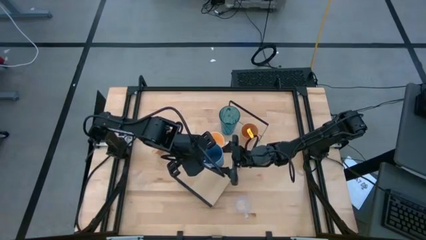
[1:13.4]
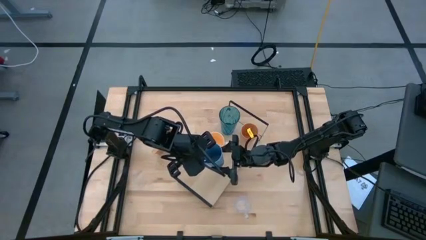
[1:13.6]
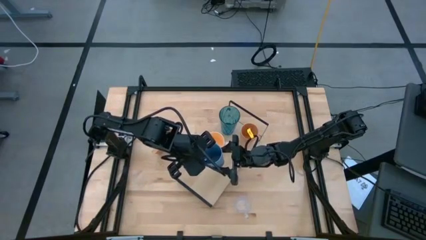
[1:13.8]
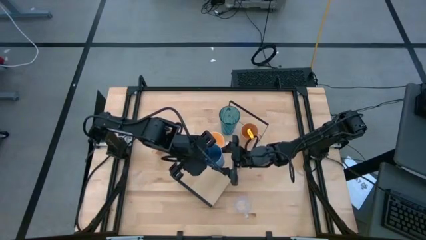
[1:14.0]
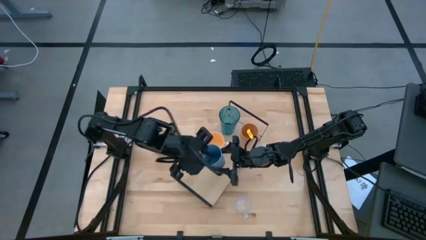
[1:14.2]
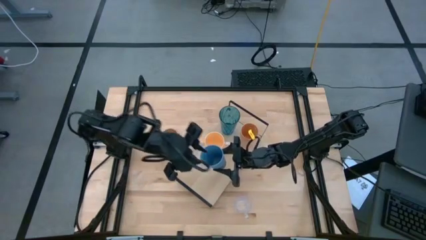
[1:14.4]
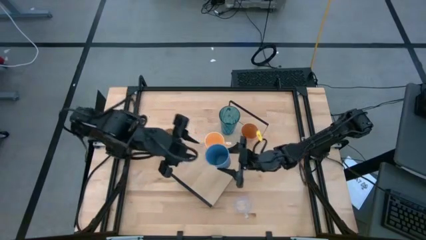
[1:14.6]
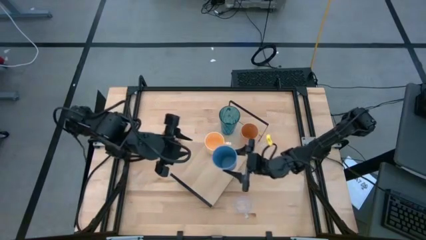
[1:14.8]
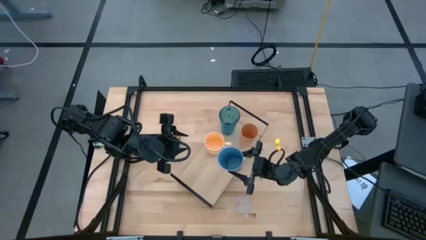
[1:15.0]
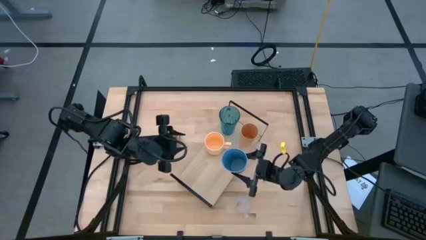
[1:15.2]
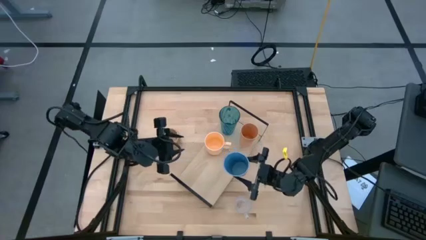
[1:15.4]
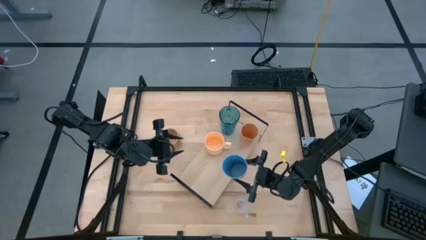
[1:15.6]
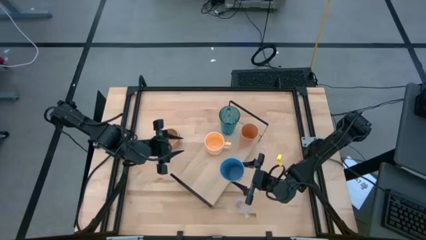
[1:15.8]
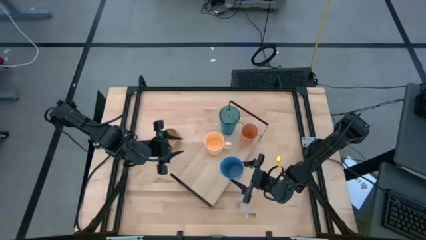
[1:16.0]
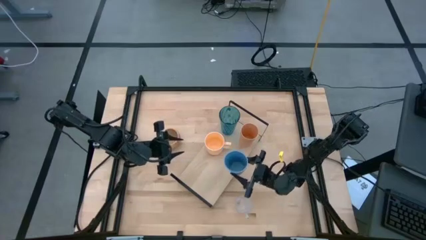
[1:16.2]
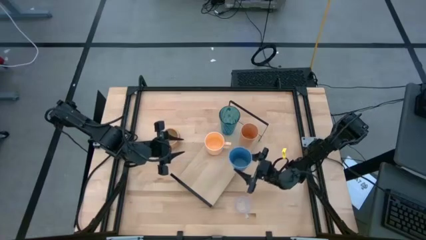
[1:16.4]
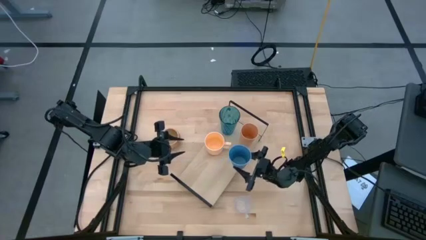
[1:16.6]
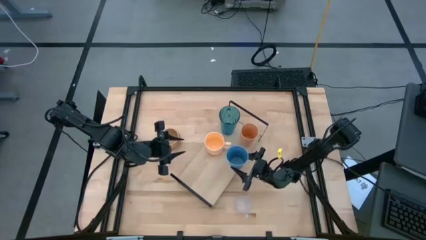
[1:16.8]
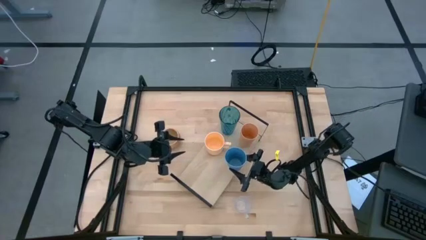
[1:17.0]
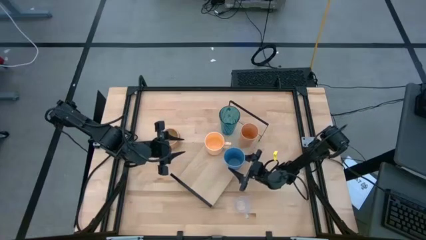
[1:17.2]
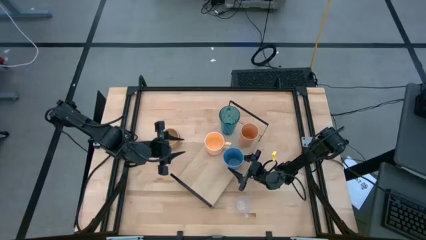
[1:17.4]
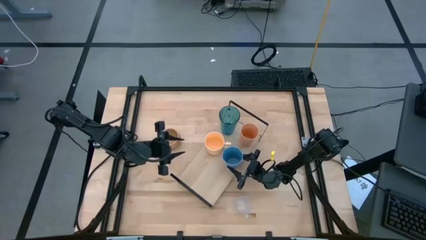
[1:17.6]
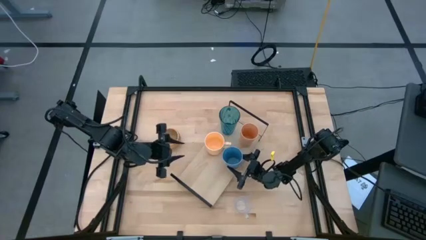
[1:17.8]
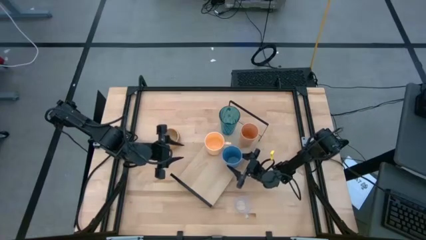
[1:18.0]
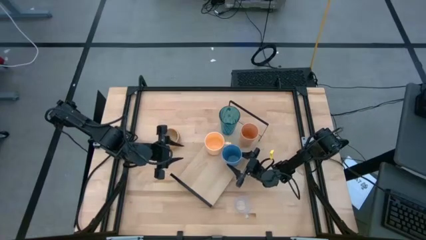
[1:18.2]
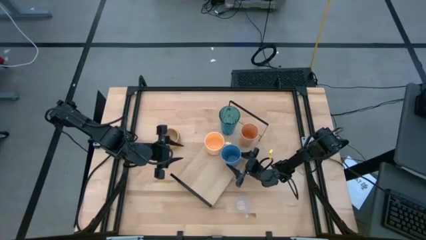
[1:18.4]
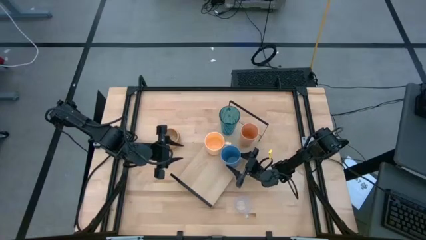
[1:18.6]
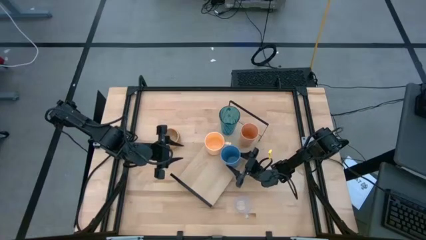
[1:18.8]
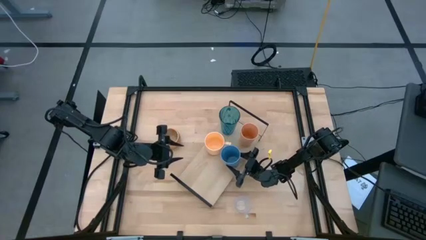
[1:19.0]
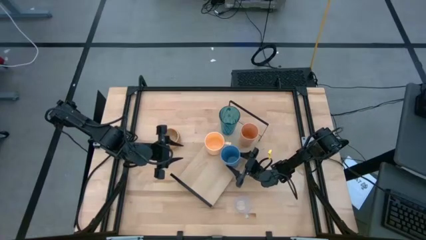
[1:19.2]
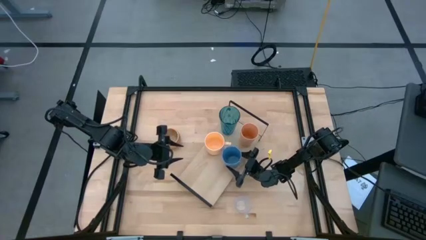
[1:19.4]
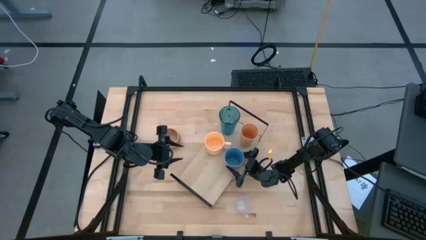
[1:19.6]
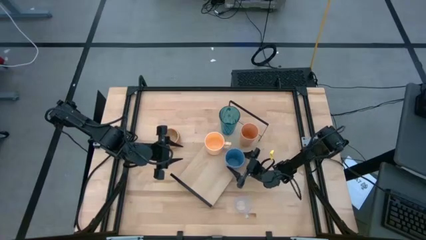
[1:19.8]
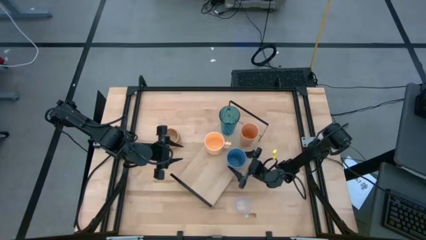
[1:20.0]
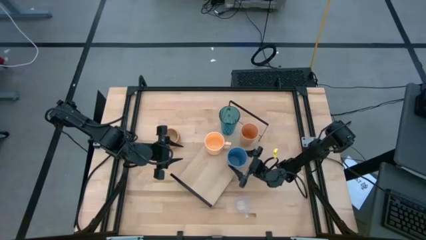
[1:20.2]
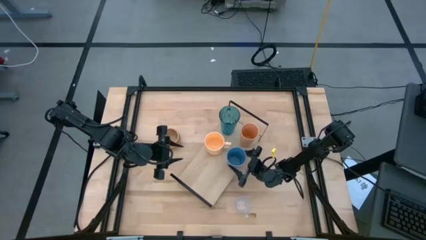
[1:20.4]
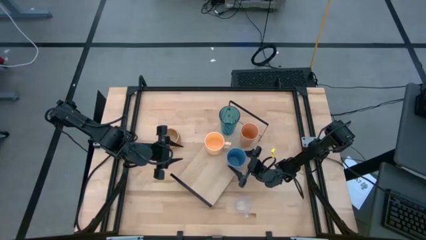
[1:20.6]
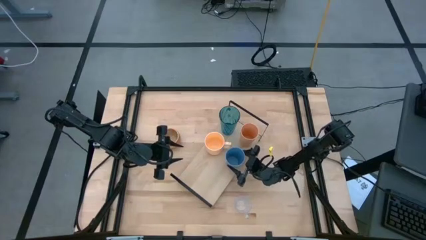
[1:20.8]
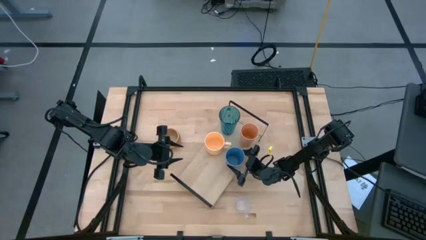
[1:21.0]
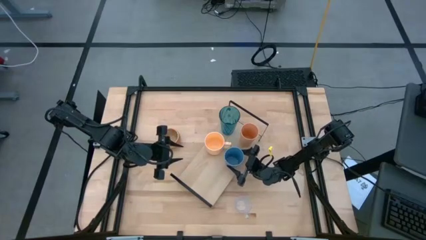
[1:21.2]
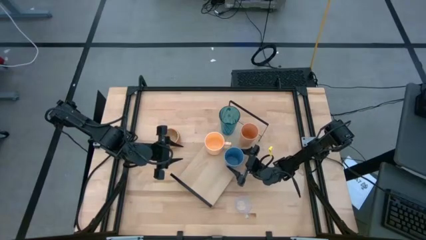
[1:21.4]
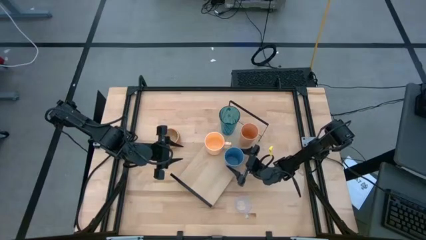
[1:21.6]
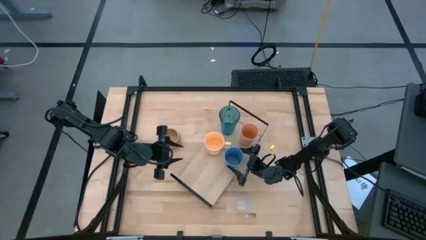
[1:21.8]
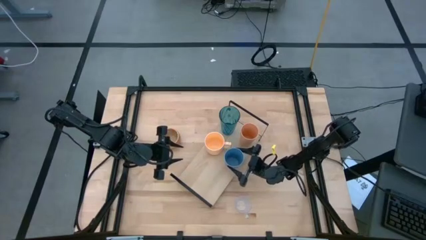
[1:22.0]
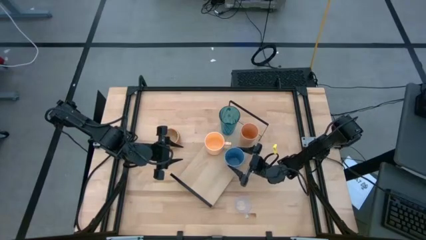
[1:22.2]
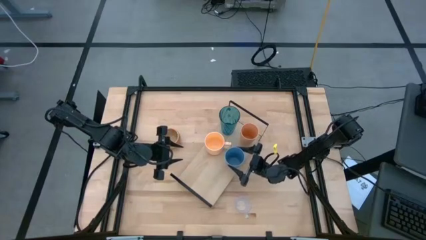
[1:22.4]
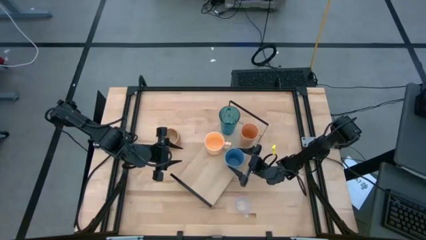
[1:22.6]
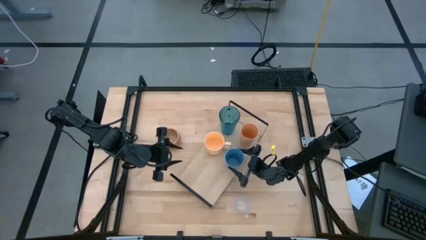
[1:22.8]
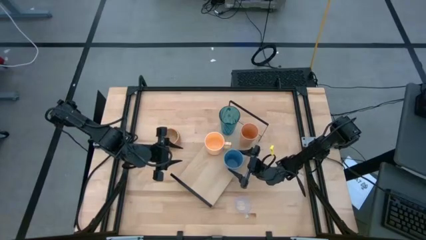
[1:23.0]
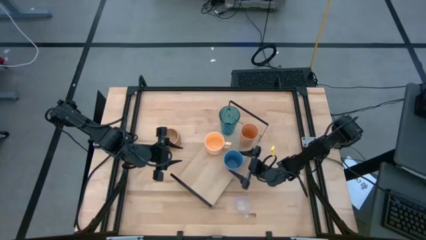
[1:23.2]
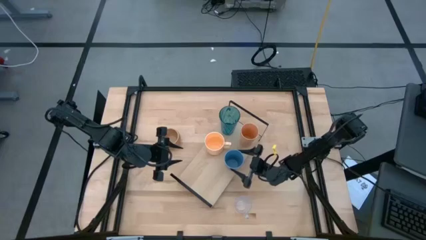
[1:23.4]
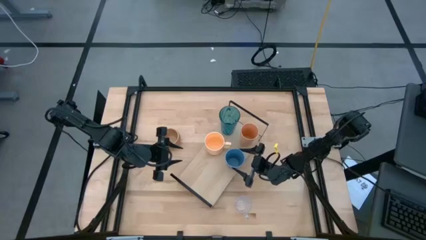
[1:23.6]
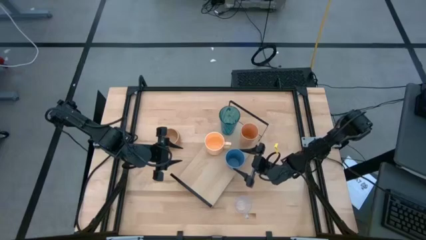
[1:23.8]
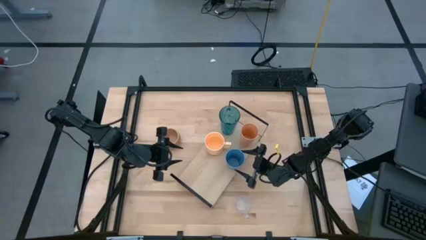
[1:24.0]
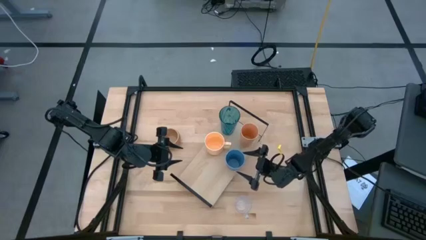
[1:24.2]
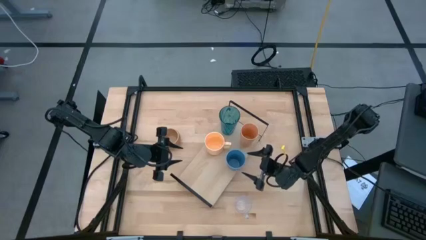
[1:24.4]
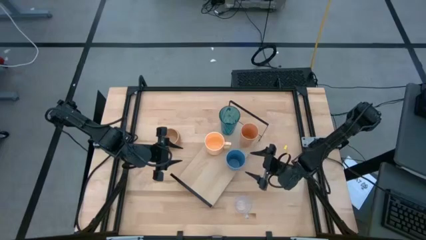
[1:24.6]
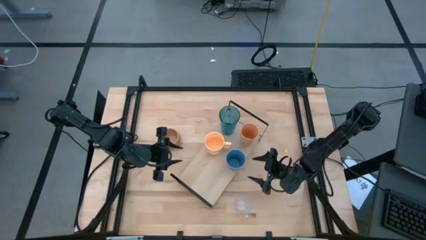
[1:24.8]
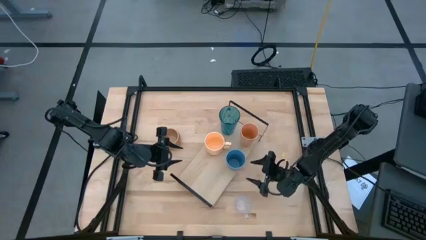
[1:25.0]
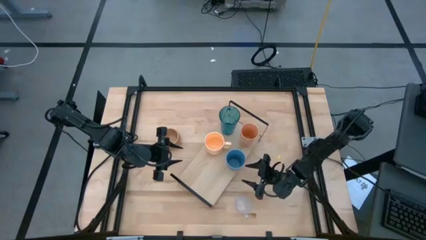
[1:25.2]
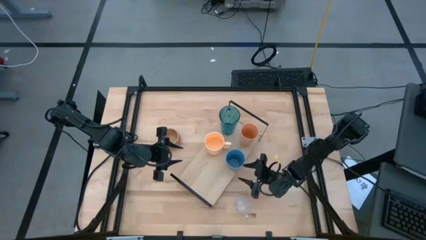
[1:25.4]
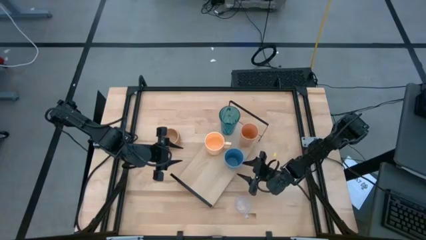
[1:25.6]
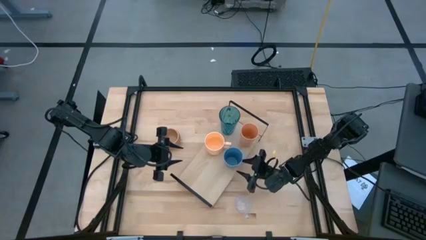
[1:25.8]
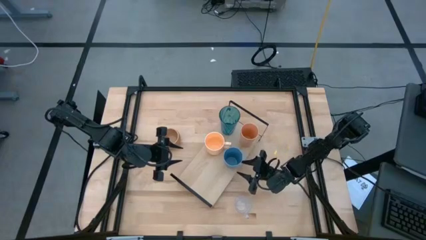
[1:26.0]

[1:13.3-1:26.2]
Task: Stack small to large cups/mugs on shelf
Put the blue cup on the shelf

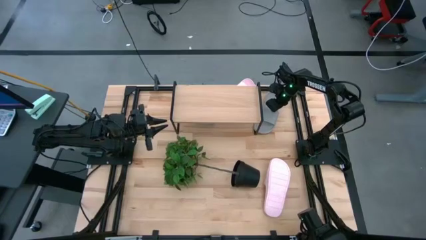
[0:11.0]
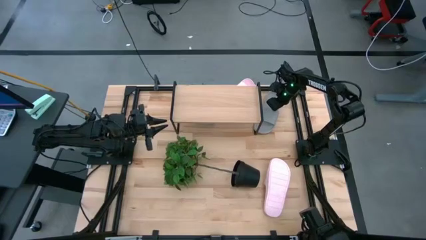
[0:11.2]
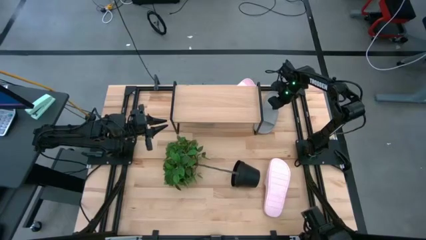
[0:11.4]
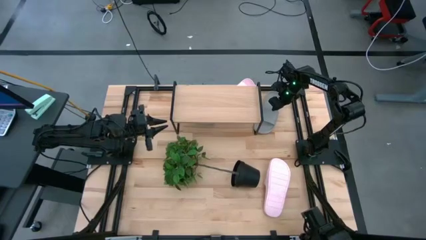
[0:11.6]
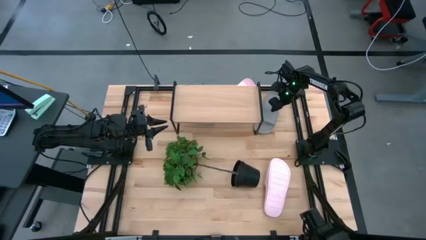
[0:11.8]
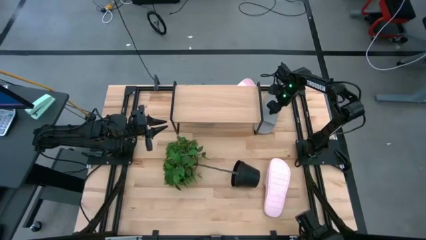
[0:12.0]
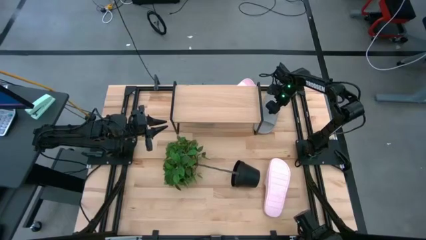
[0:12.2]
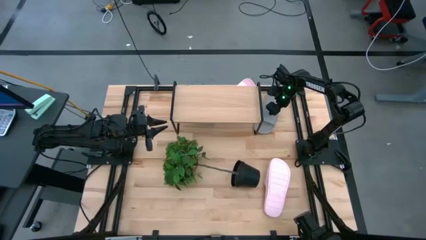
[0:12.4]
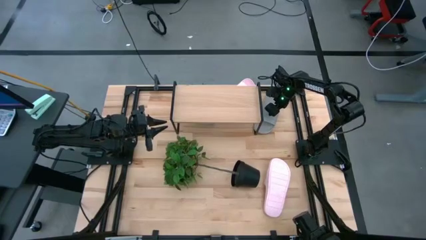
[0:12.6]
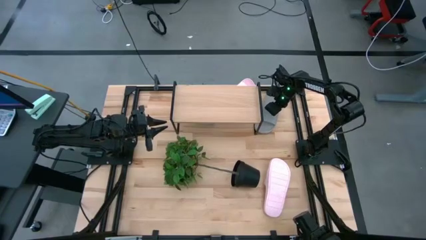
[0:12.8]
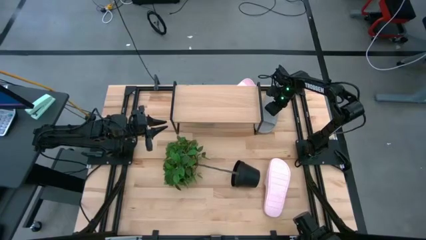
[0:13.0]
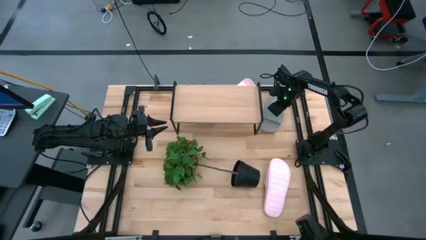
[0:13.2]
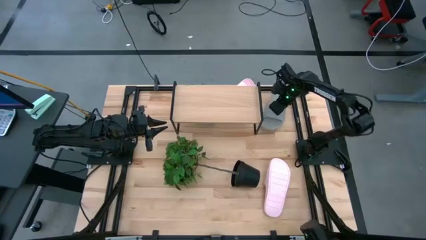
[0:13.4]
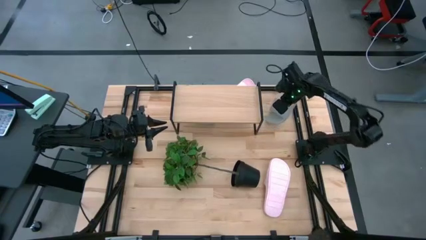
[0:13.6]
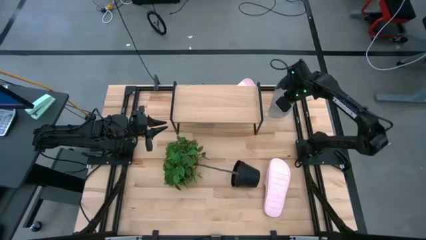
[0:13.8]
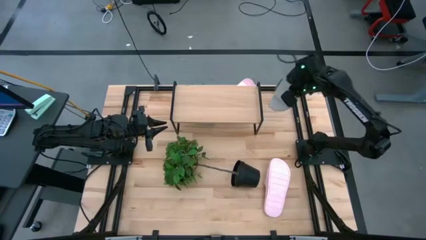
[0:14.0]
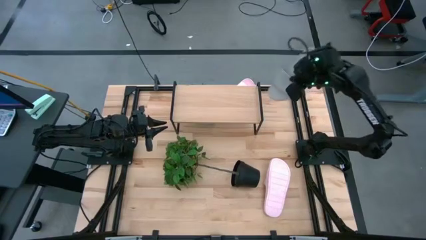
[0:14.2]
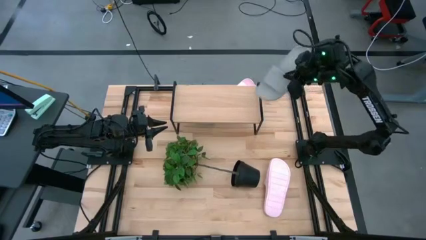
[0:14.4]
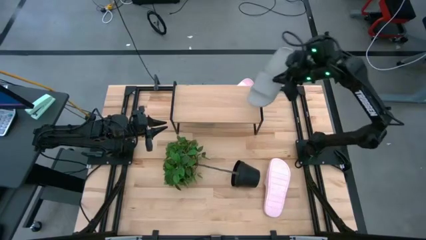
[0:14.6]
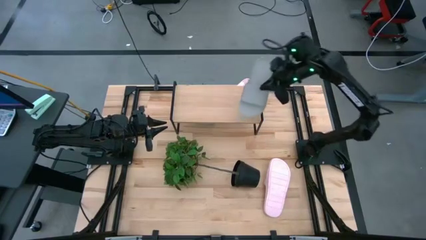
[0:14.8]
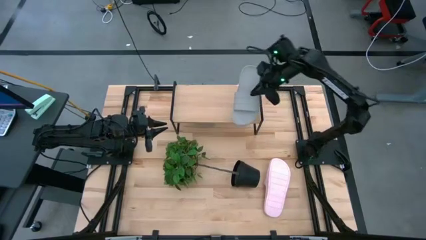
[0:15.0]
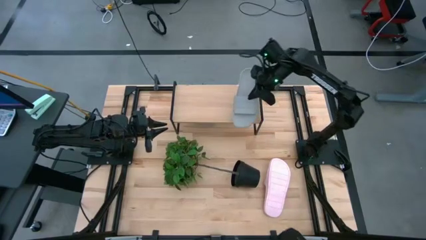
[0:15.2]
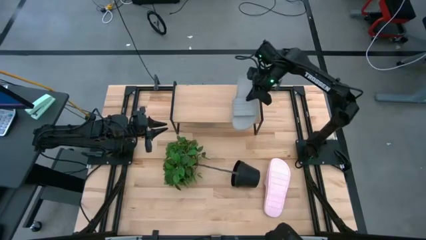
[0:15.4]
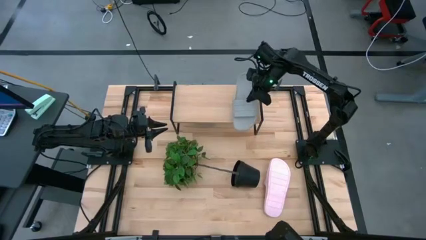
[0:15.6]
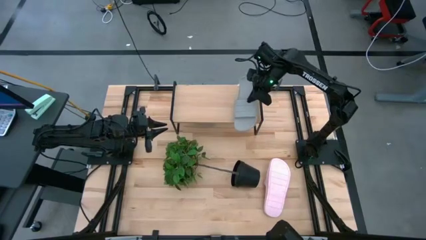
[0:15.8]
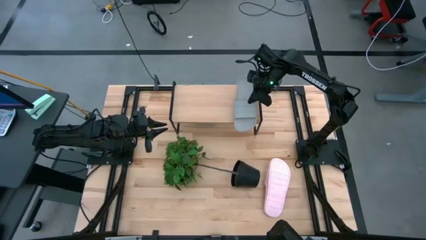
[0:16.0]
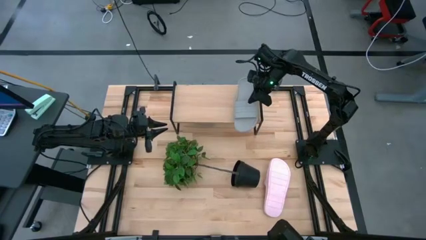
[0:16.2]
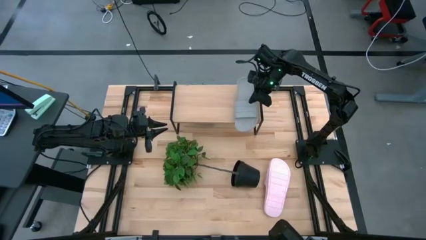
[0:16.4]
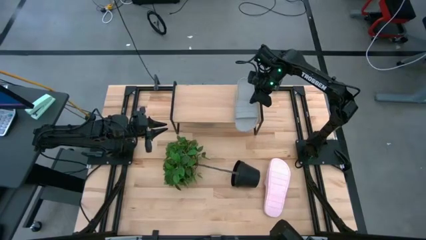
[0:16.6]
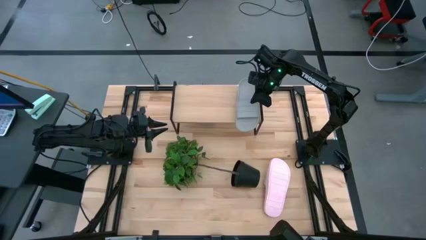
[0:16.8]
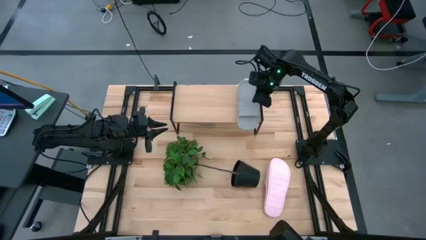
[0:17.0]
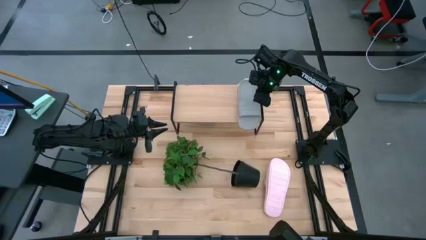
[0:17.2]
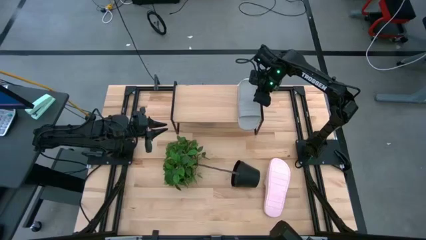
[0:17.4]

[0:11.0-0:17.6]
Task: Pick and place slides into the shelf
Put the right gray slide on the shelf
